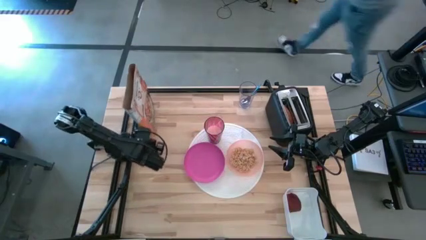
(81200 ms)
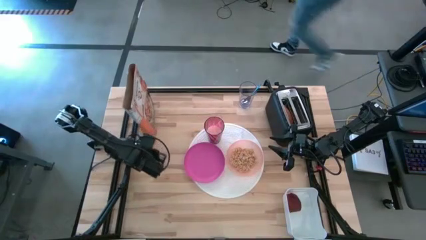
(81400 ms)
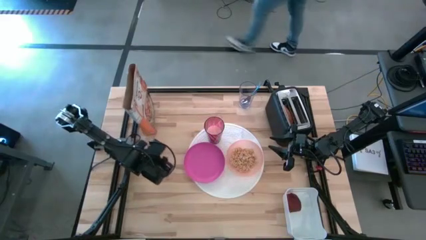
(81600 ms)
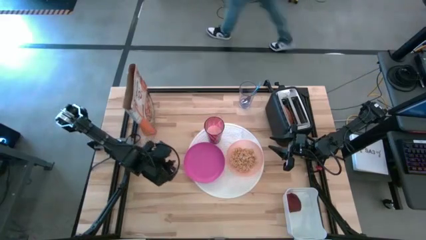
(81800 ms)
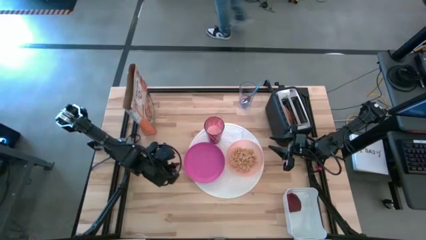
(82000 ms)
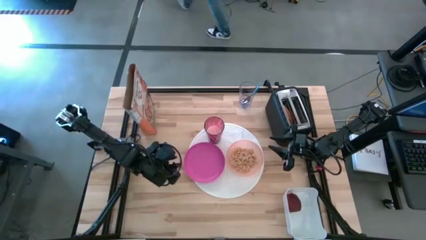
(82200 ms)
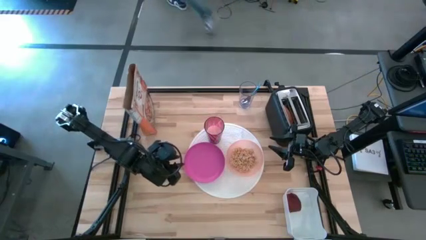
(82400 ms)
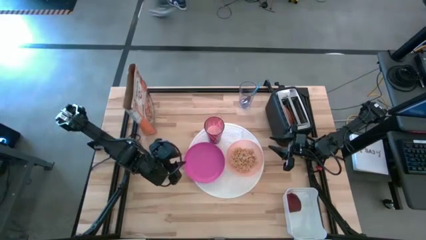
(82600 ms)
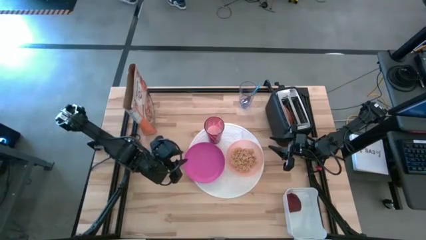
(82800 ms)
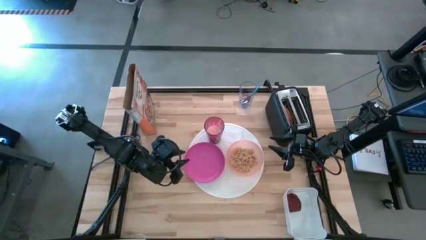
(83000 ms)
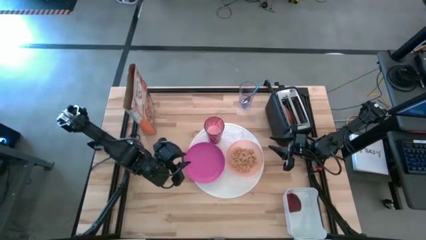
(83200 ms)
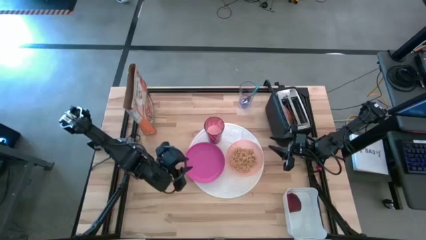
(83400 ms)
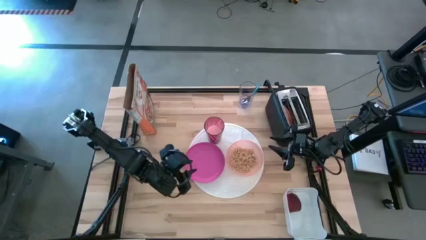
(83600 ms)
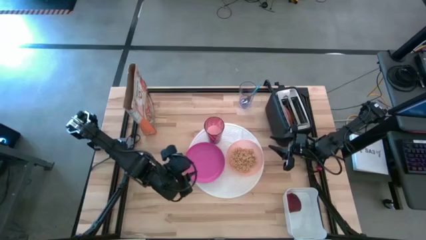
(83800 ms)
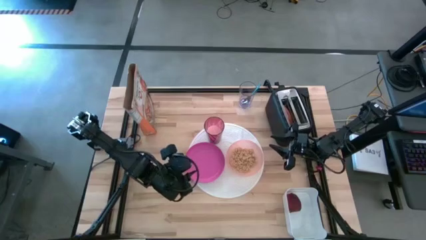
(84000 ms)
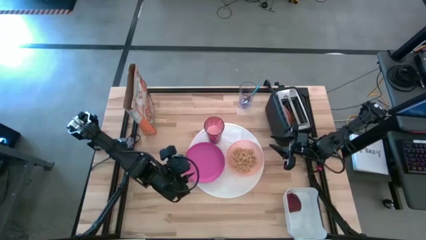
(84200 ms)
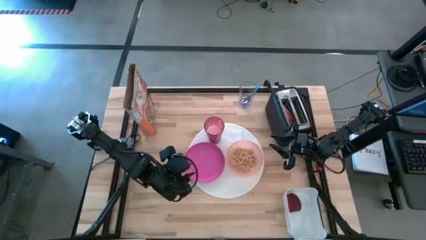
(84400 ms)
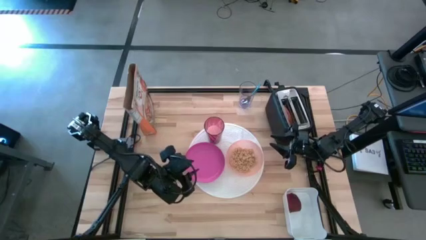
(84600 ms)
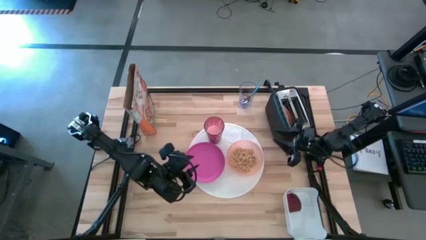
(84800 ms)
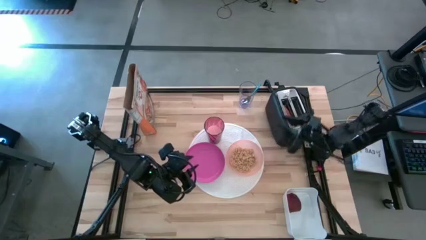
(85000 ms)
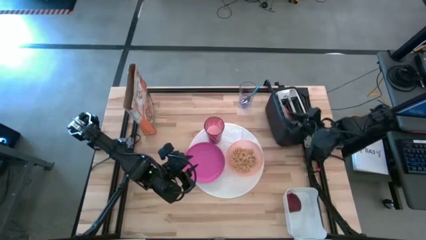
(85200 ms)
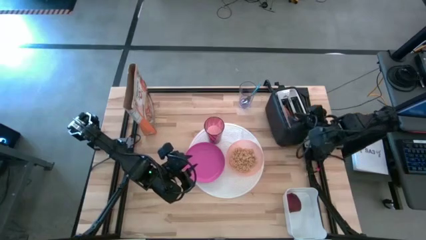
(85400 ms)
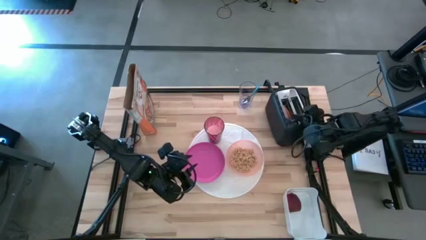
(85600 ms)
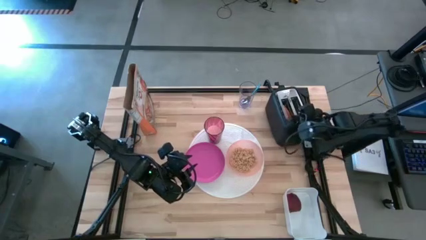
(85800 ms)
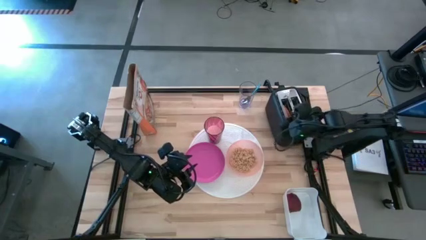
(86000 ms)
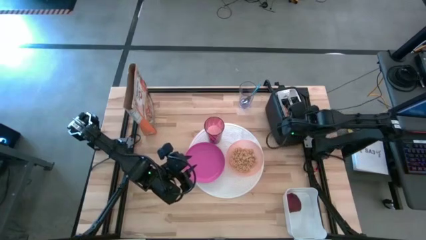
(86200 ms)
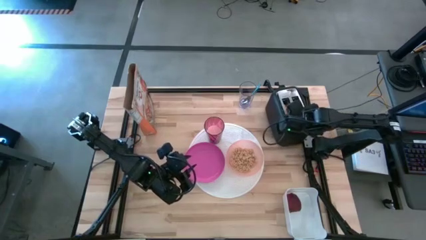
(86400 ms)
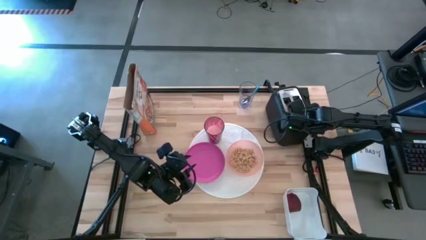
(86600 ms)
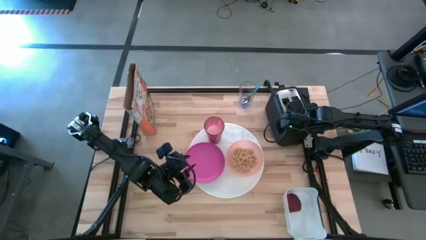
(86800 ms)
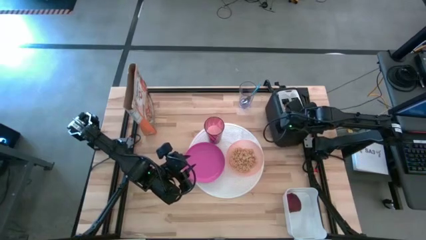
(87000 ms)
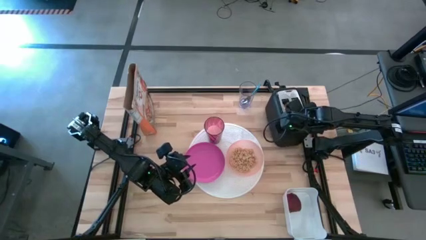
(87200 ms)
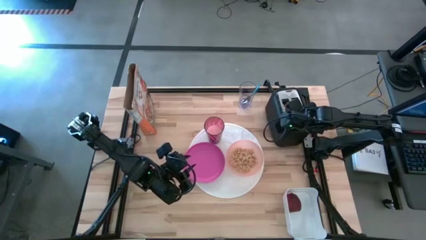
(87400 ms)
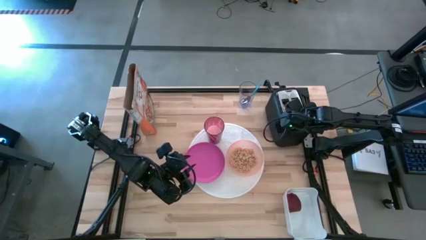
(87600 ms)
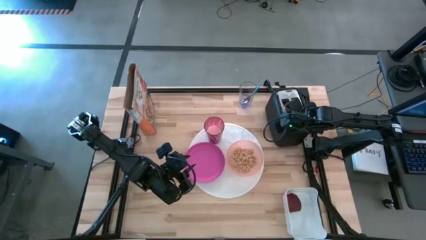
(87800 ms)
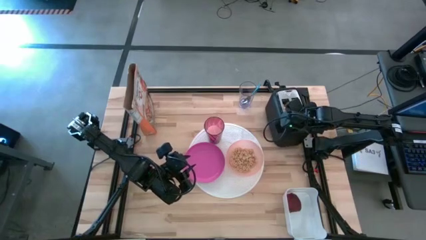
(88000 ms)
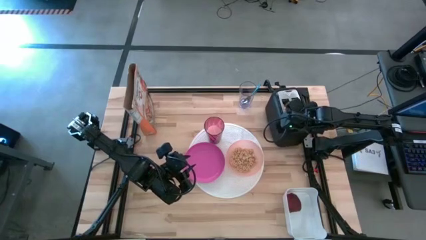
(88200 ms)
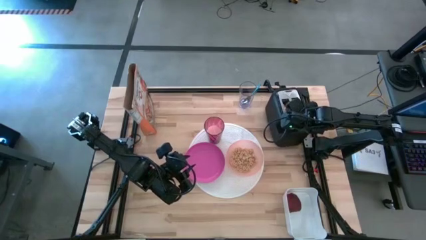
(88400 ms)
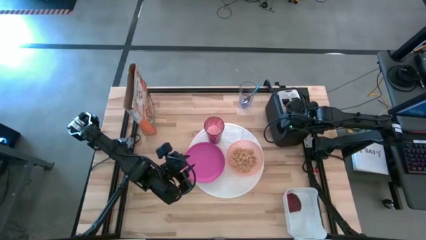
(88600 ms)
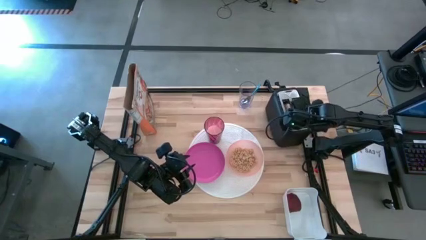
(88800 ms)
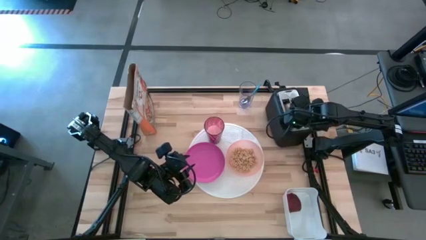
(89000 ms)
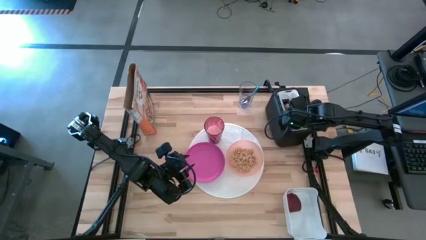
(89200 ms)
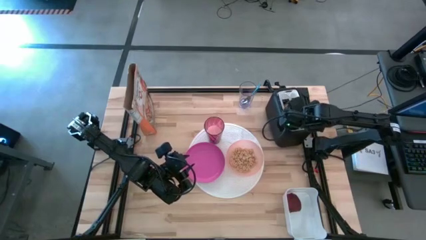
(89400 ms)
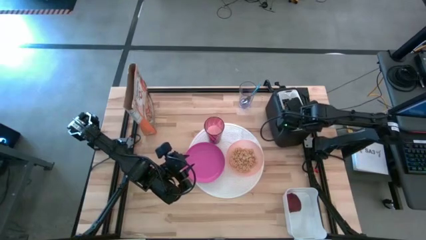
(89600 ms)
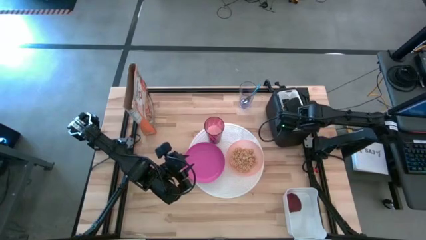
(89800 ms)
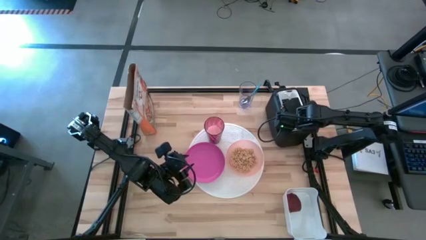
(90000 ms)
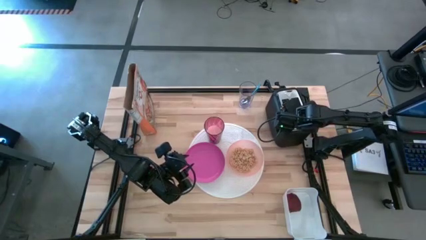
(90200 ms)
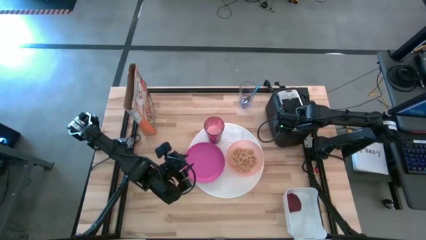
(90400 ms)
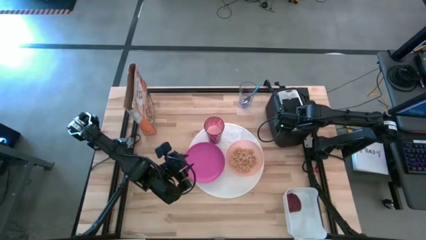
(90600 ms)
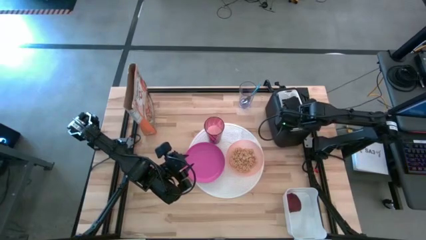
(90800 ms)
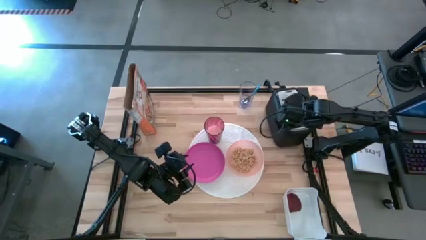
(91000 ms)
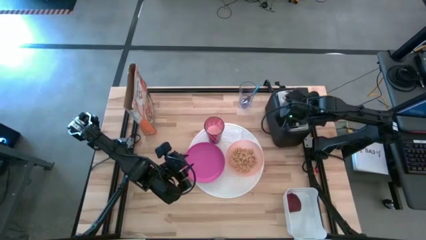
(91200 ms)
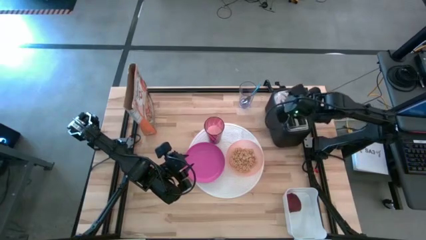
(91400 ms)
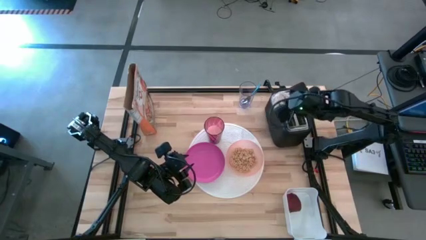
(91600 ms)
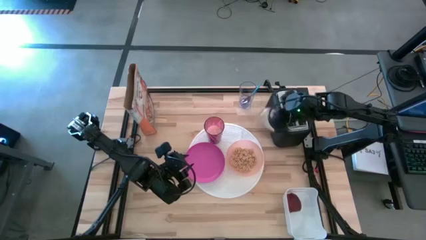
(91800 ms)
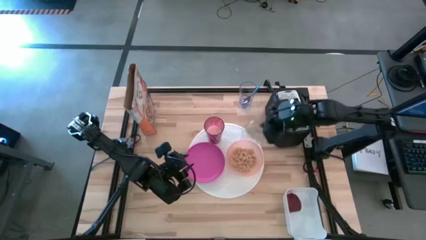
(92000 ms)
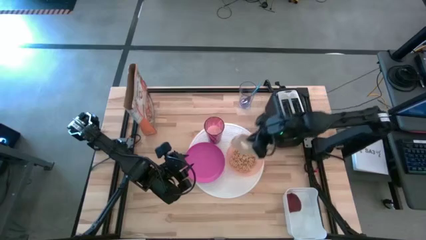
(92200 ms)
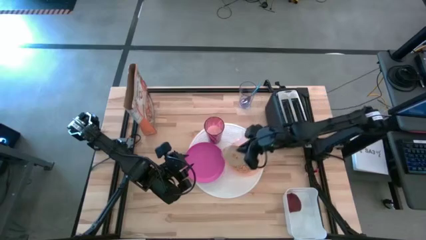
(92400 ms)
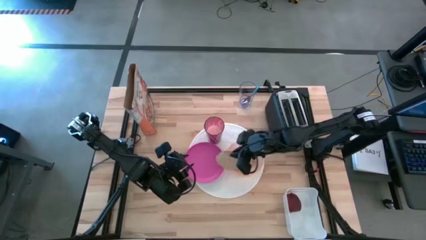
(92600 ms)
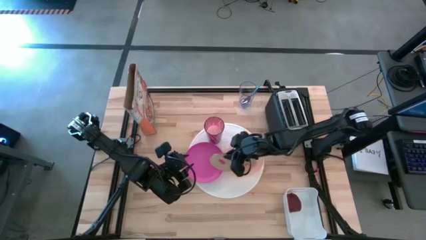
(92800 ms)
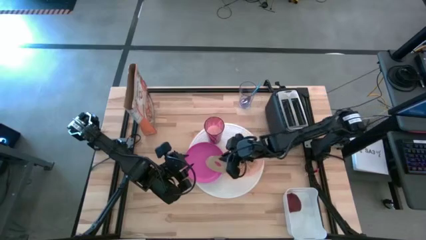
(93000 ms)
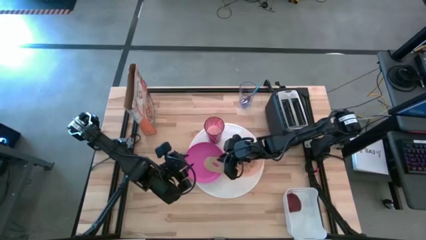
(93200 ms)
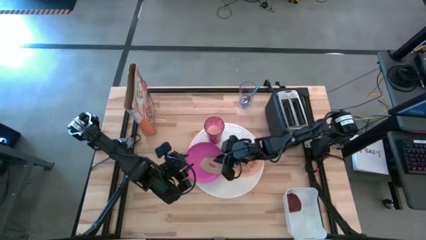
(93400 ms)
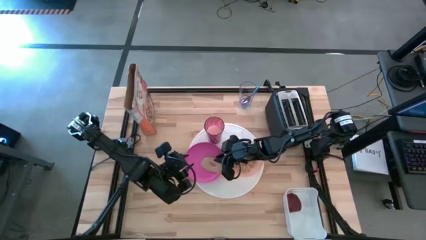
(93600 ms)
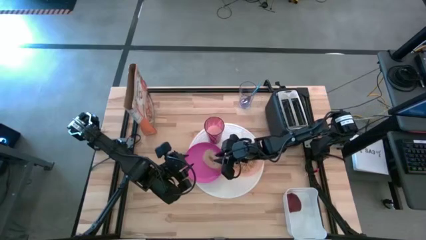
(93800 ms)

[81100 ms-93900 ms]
Task: Arrange a breakfast setting
Put the toasted bread on the pink plate
